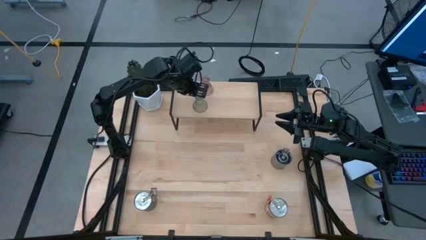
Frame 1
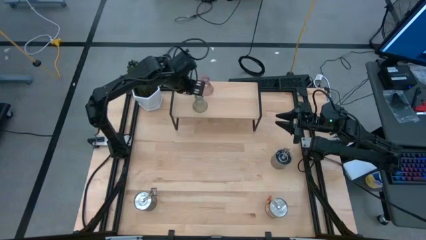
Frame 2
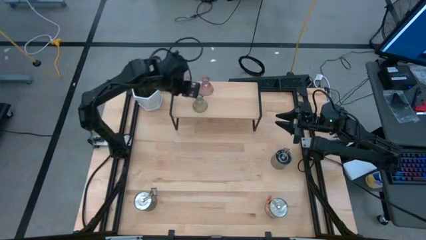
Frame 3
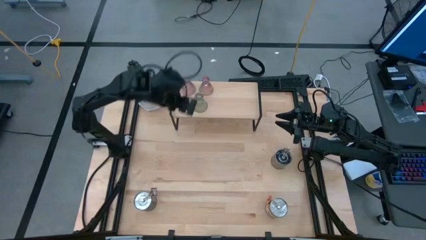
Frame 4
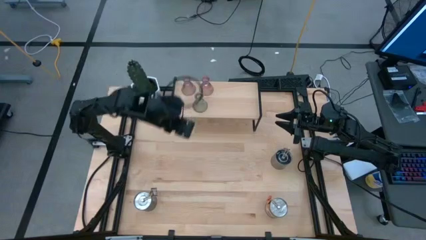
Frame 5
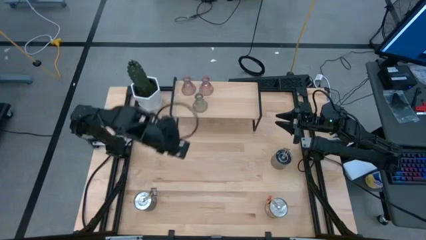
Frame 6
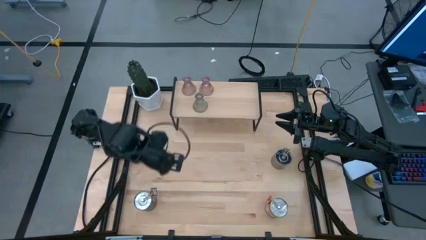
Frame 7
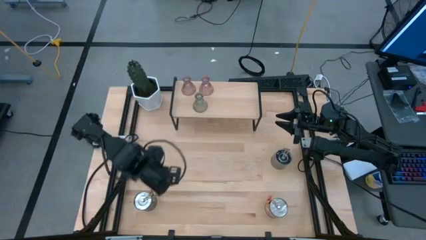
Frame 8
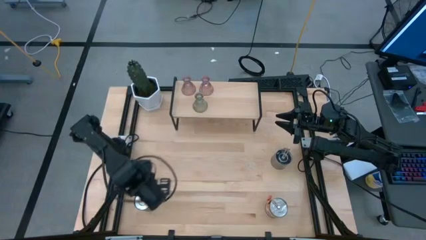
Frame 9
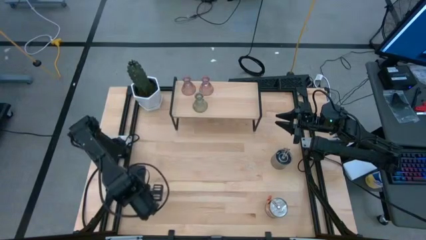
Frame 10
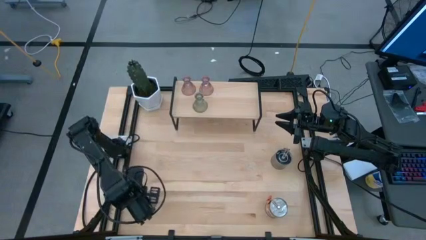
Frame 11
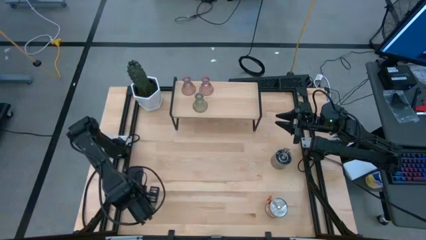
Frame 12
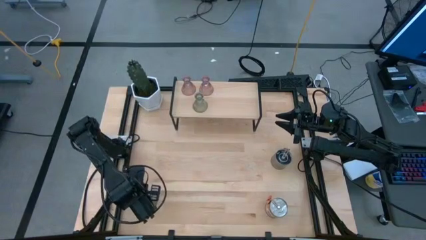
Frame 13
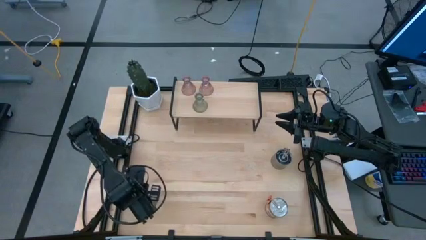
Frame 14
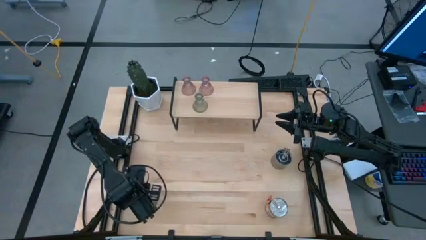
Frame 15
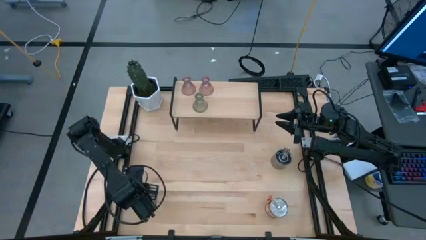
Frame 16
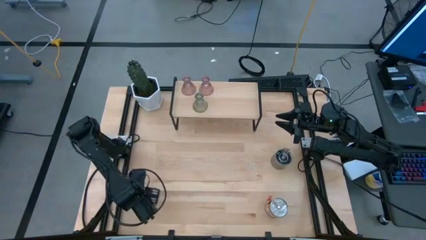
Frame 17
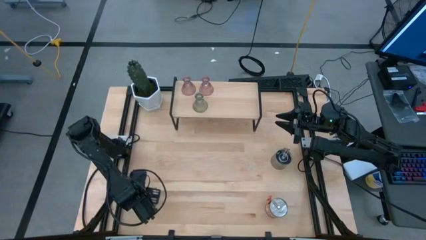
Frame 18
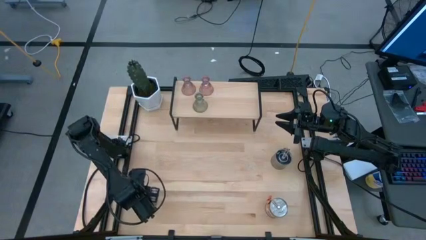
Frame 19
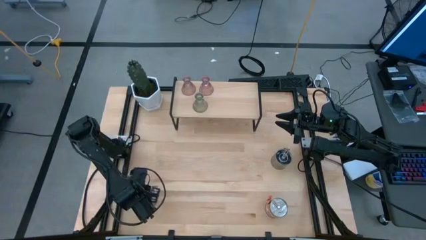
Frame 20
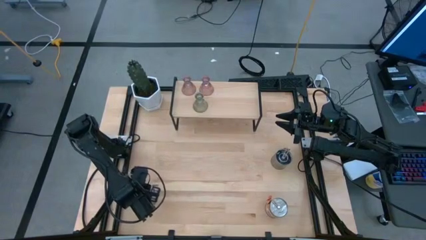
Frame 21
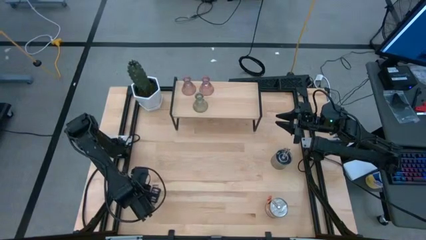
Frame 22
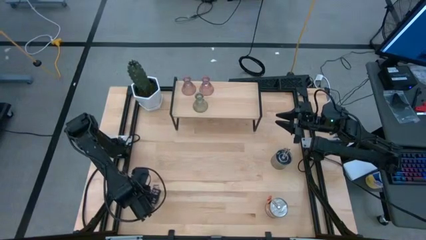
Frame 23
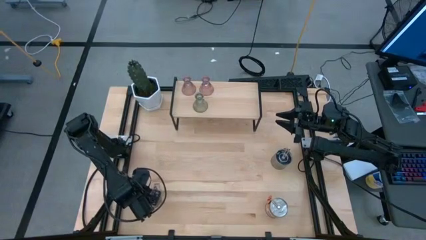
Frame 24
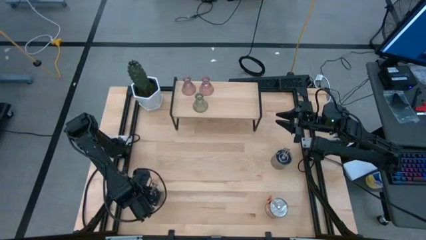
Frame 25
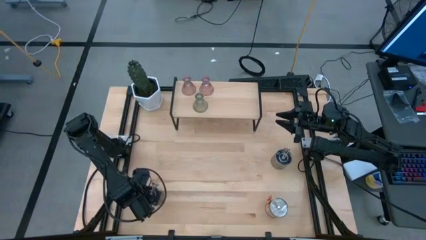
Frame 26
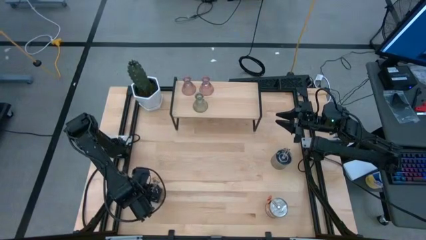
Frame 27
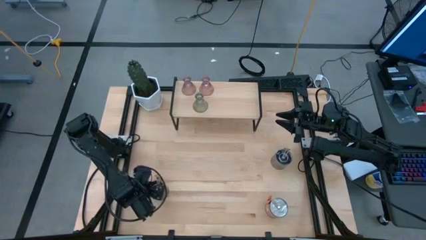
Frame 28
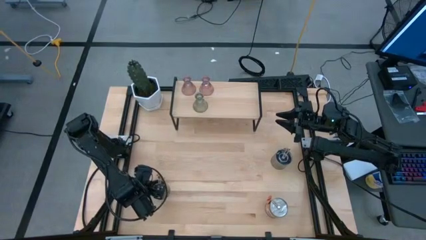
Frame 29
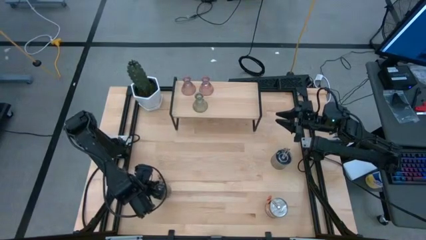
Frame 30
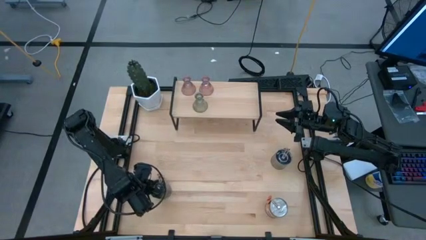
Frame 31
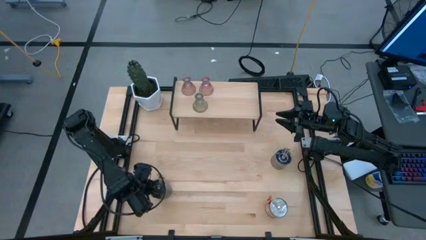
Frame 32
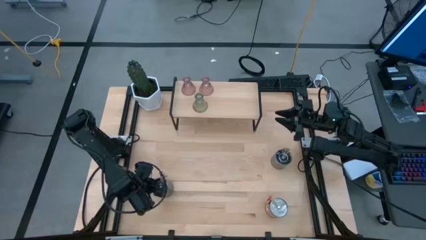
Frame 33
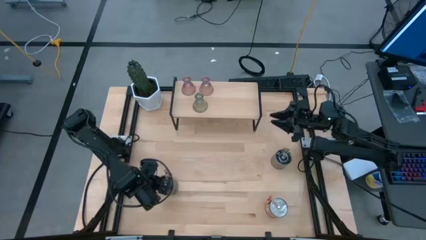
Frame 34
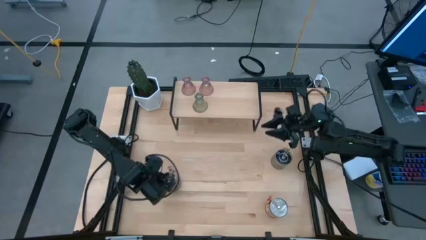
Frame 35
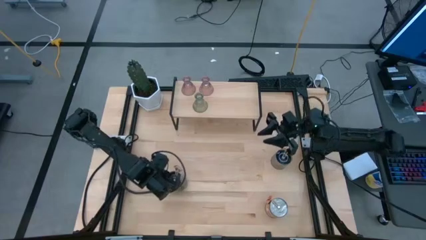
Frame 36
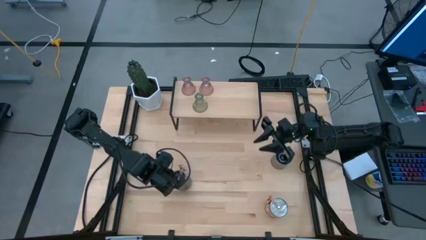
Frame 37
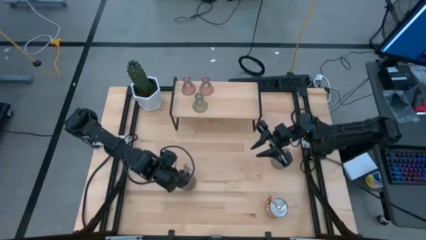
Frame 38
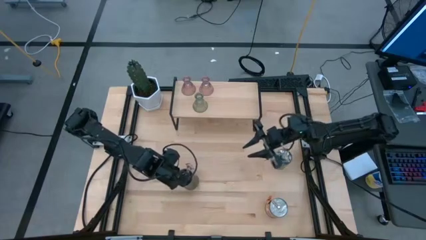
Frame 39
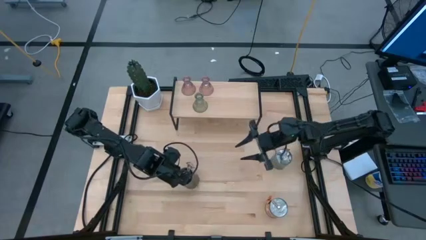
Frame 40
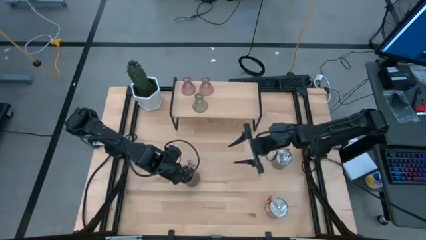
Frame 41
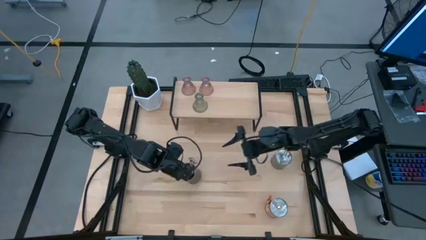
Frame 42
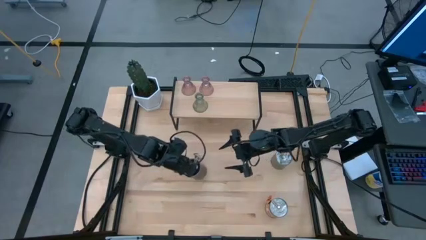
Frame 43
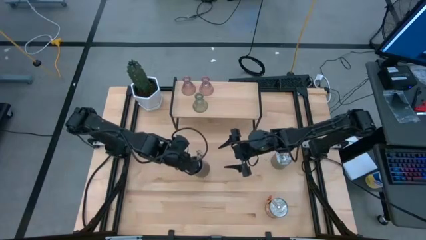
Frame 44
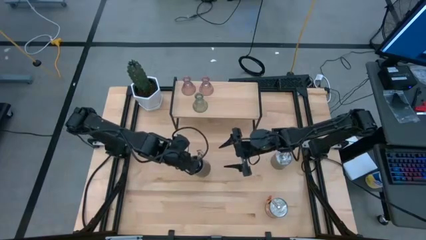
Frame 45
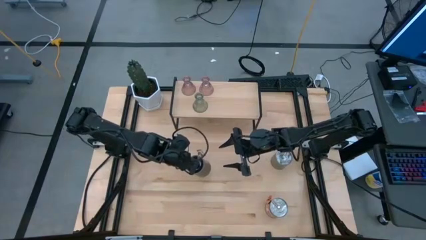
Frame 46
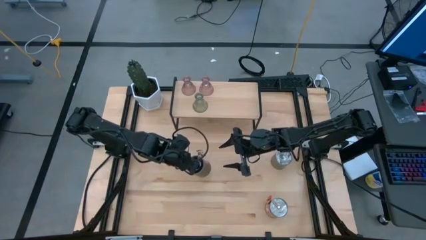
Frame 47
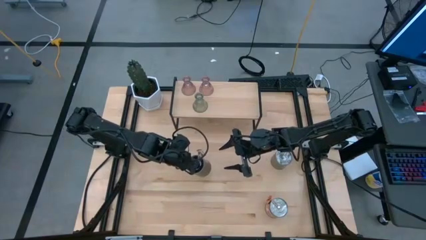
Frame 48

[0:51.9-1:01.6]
Task: Pick & Place candle stick holders
Put the bottom left silver scented candle on the shelf

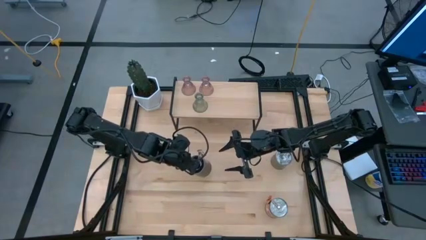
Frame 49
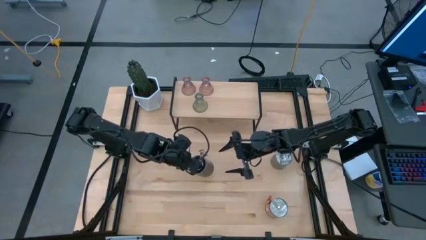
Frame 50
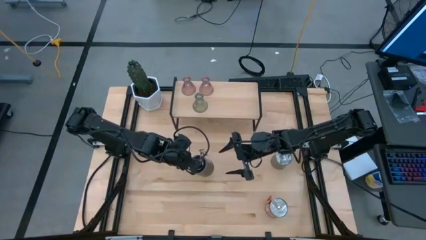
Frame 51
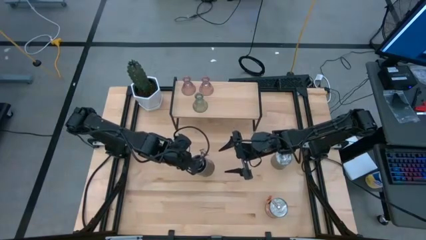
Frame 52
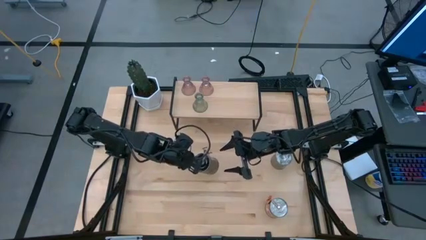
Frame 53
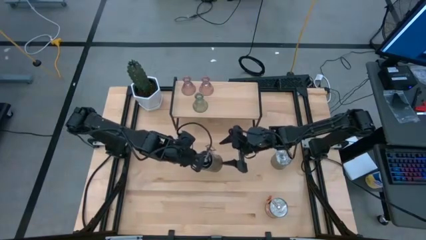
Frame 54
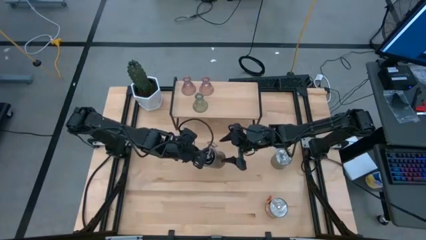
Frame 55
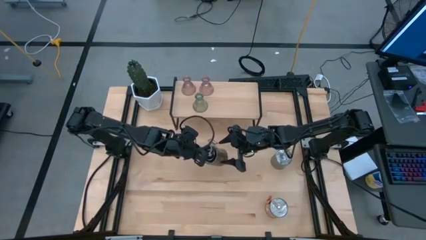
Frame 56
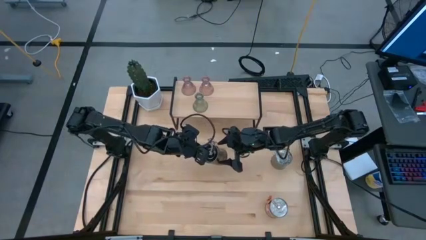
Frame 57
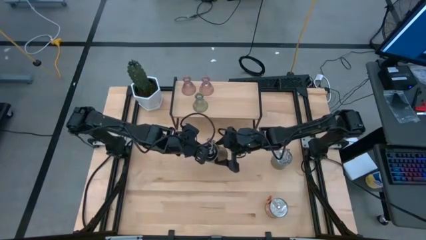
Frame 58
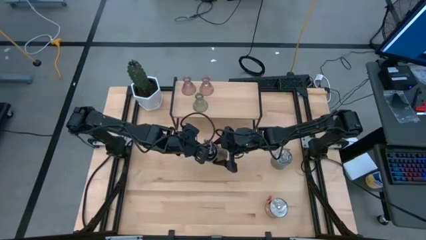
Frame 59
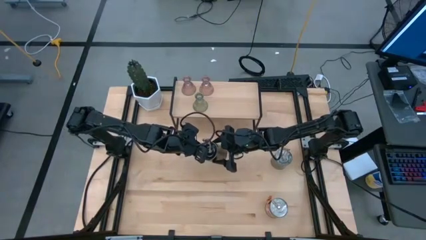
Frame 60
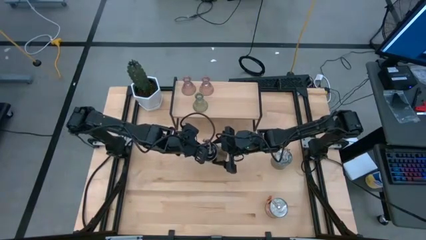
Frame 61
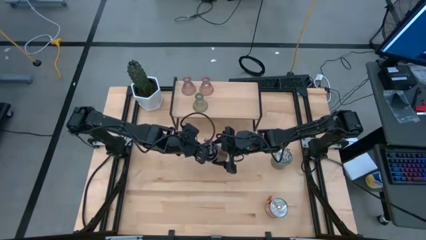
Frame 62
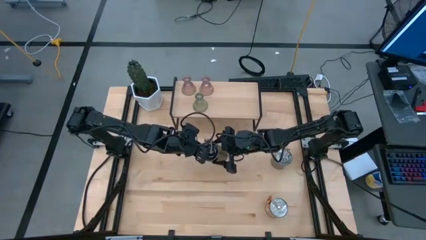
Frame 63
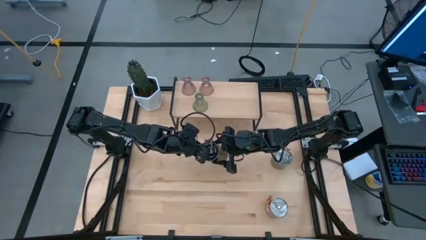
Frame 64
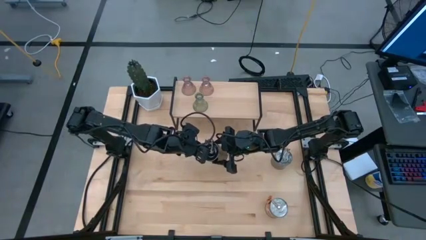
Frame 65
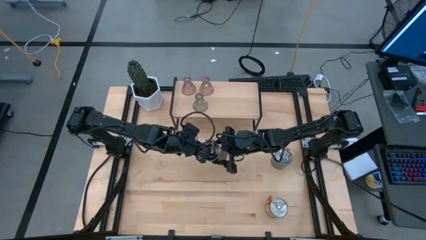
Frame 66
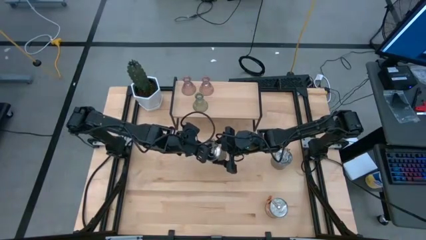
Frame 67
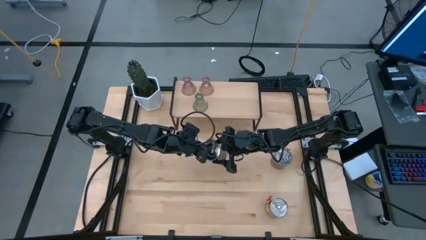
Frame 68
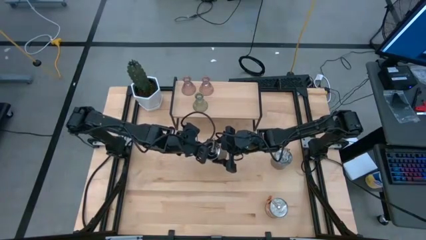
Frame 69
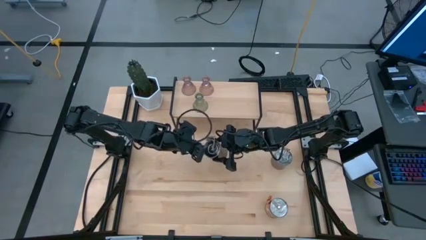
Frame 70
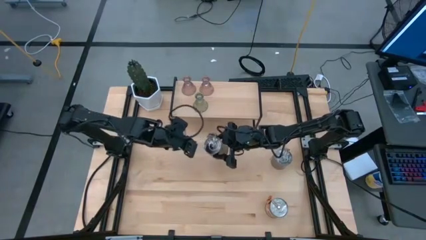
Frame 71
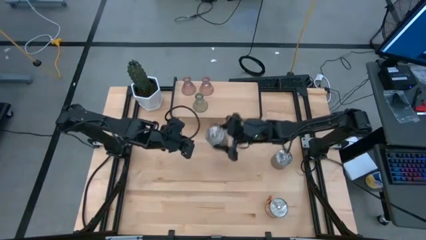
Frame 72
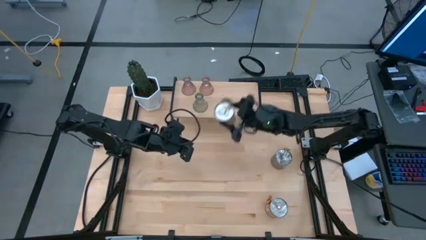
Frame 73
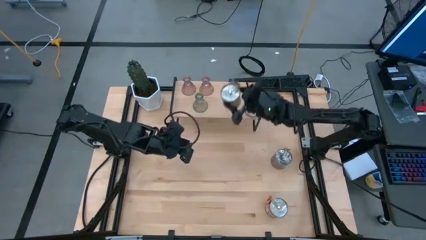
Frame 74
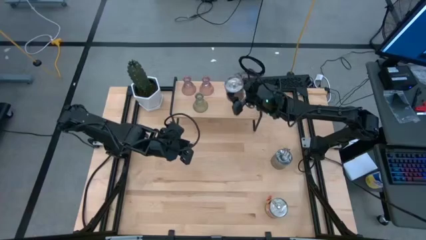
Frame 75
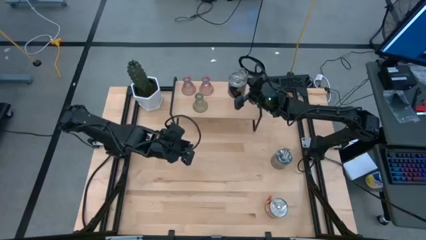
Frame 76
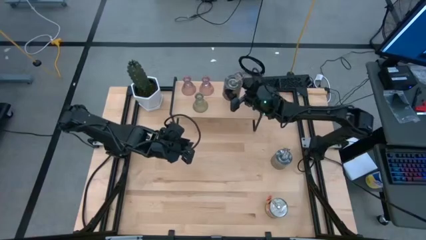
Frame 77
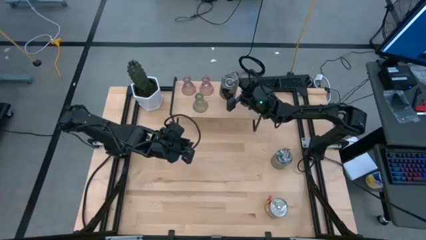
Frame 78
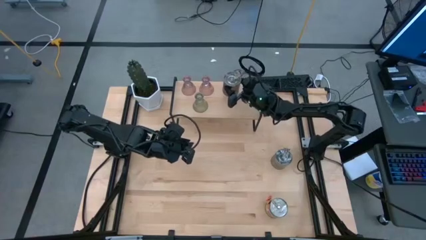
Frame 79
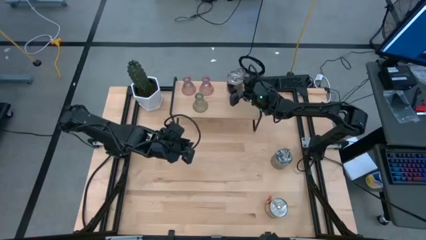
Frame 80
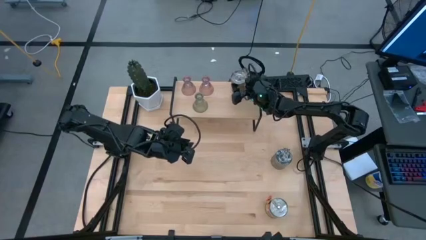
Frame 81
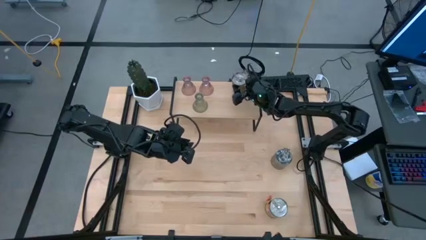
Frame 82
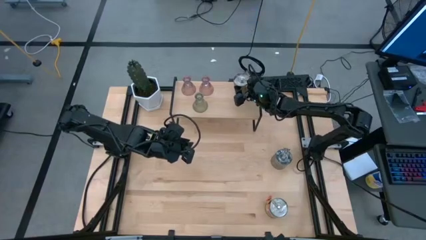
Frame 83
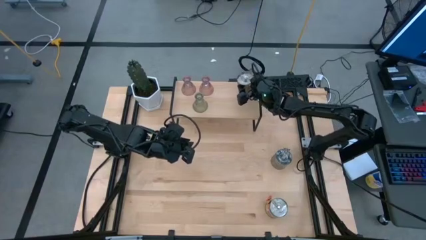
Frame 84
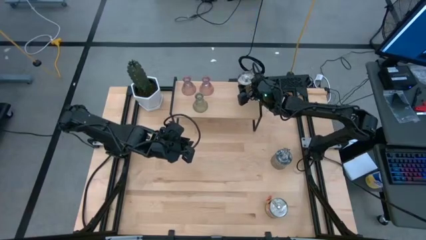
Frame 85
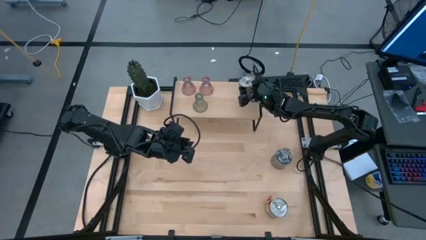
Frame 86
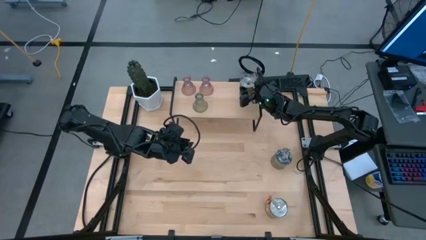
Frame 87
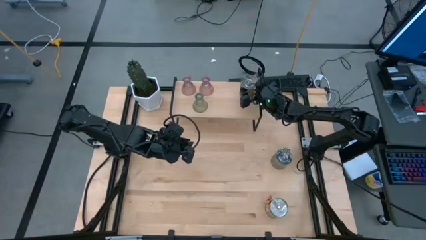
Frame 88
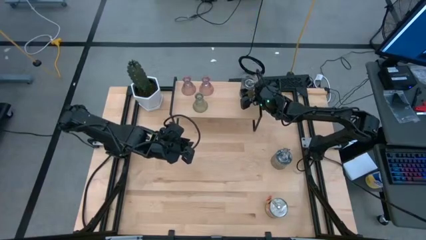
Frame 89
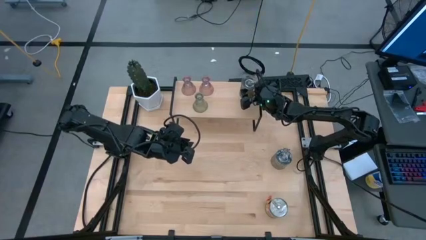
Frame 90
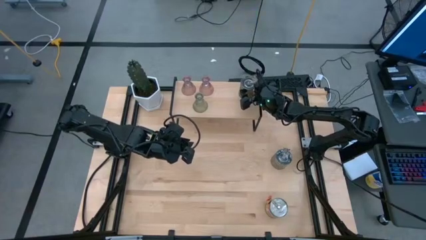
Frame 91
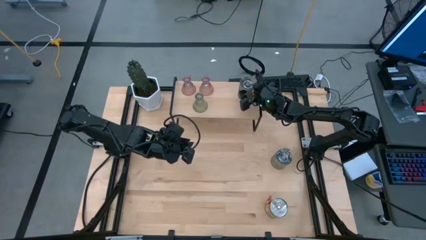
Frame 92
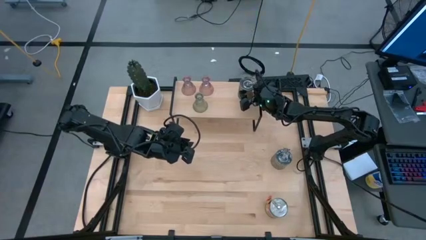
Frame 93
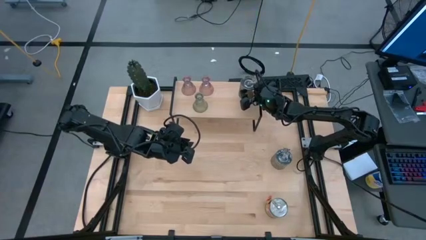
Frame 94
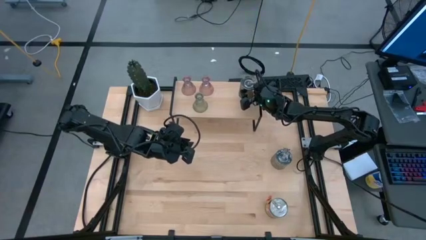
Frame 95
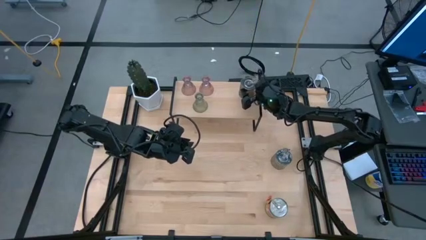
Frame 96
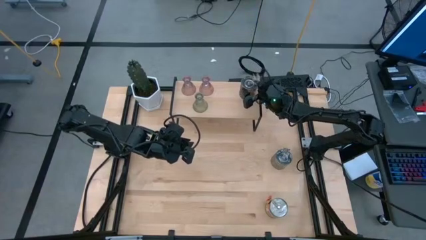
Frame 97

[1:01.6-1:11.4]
Put the bottom left silver scented candle on the shelf
